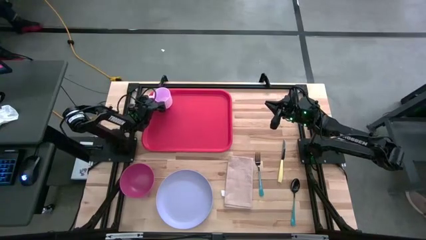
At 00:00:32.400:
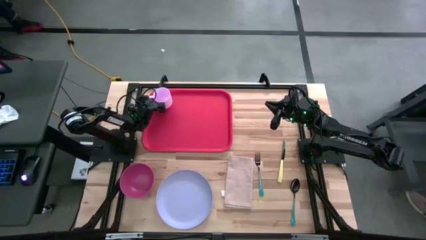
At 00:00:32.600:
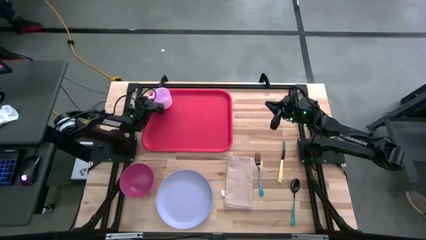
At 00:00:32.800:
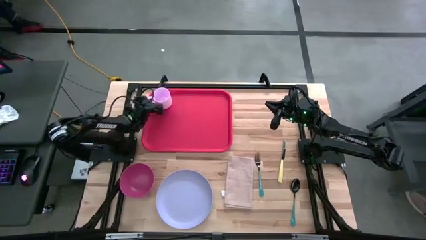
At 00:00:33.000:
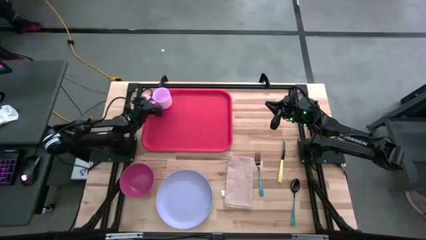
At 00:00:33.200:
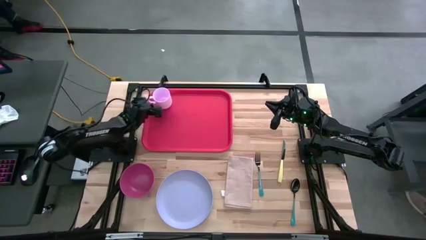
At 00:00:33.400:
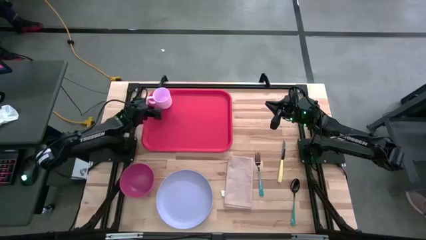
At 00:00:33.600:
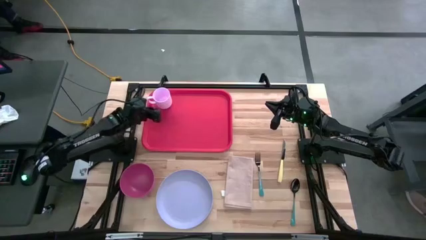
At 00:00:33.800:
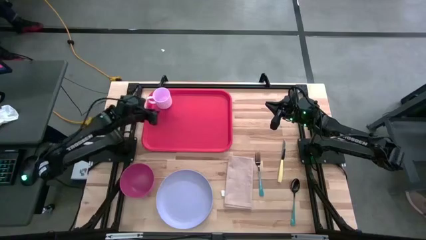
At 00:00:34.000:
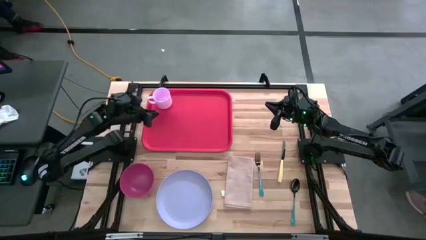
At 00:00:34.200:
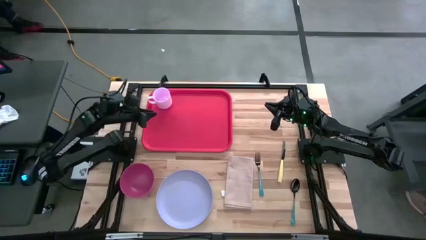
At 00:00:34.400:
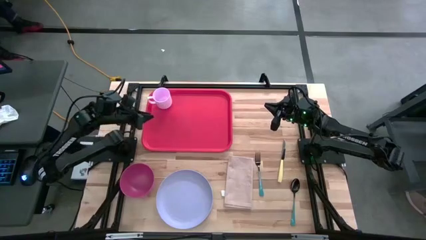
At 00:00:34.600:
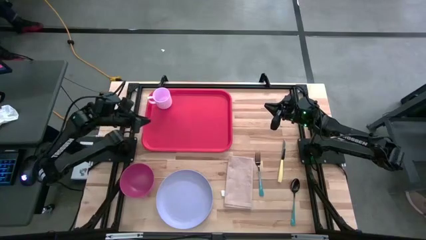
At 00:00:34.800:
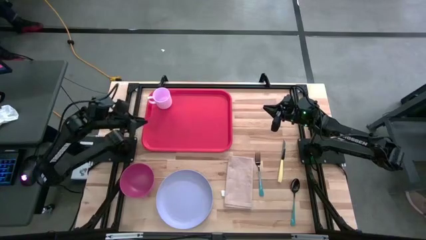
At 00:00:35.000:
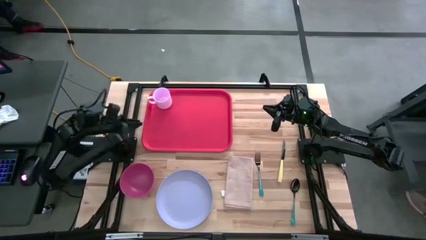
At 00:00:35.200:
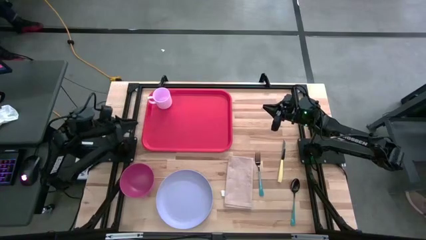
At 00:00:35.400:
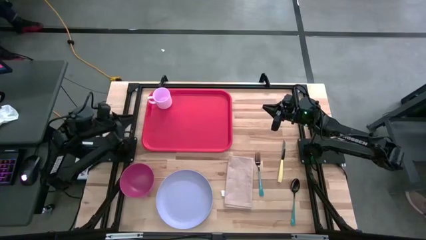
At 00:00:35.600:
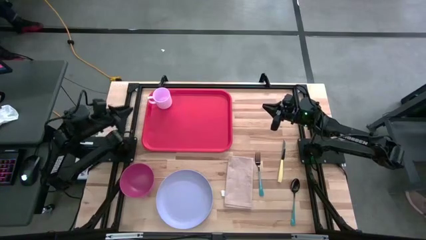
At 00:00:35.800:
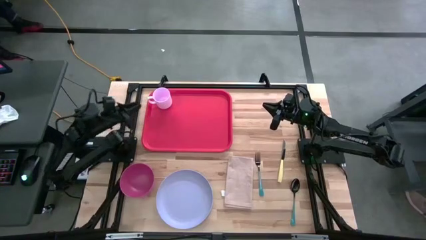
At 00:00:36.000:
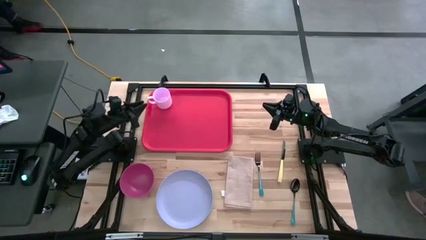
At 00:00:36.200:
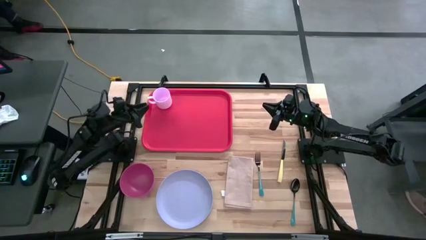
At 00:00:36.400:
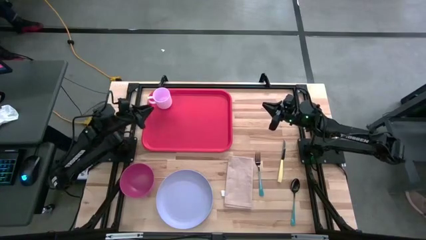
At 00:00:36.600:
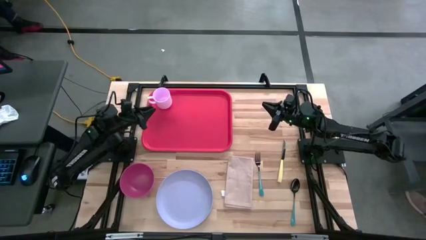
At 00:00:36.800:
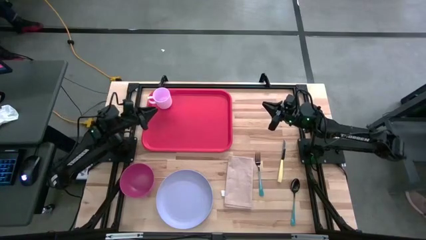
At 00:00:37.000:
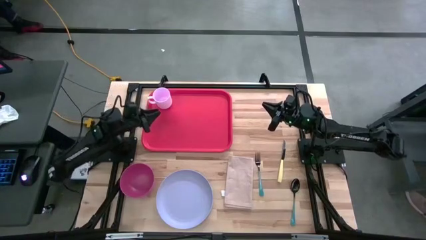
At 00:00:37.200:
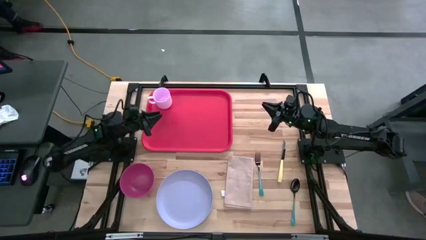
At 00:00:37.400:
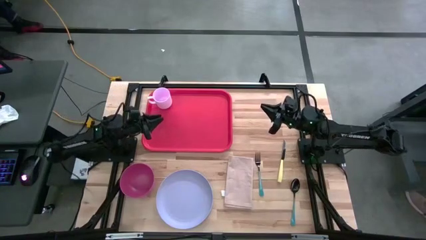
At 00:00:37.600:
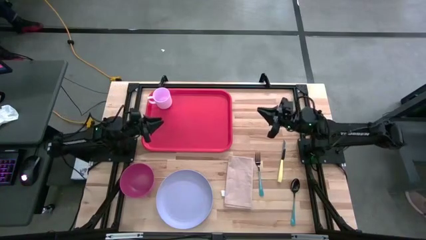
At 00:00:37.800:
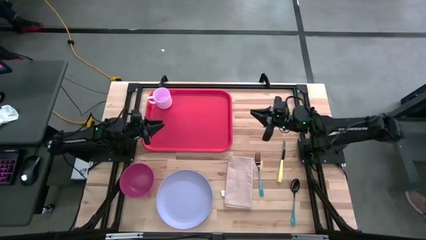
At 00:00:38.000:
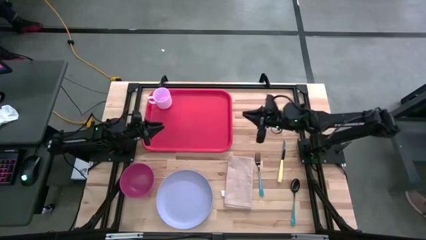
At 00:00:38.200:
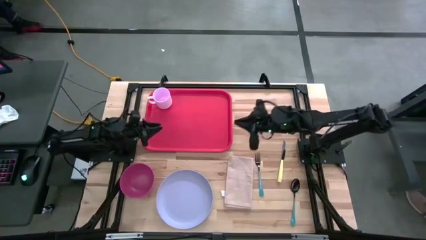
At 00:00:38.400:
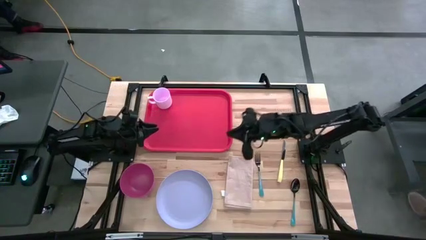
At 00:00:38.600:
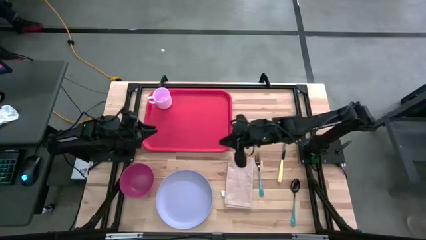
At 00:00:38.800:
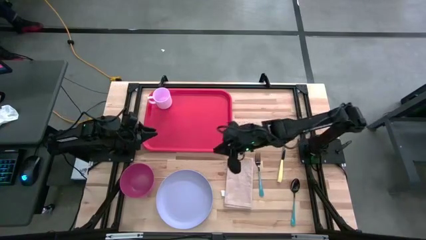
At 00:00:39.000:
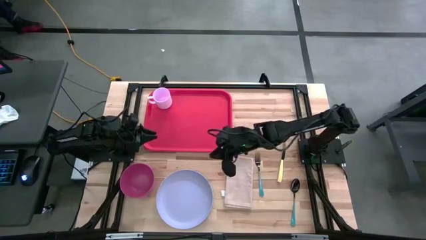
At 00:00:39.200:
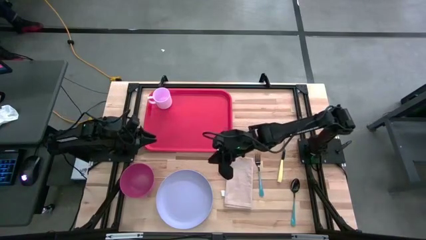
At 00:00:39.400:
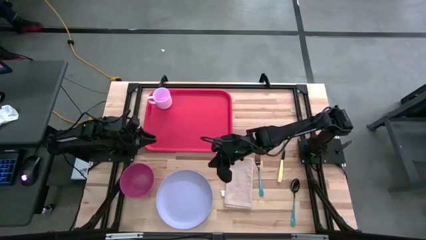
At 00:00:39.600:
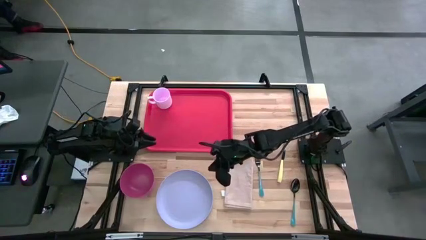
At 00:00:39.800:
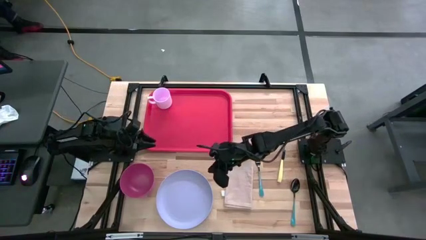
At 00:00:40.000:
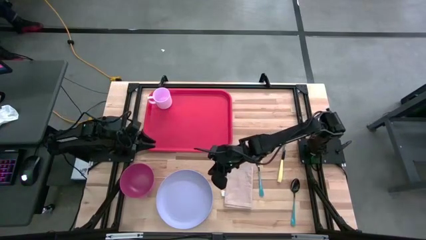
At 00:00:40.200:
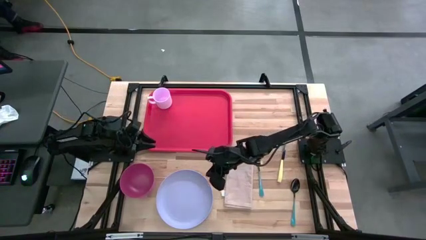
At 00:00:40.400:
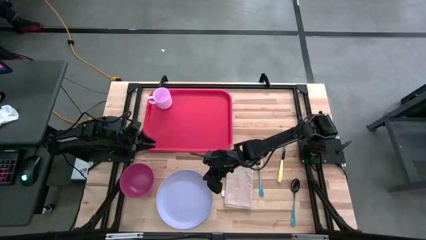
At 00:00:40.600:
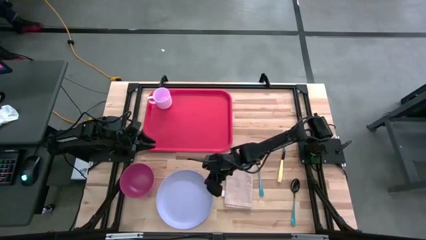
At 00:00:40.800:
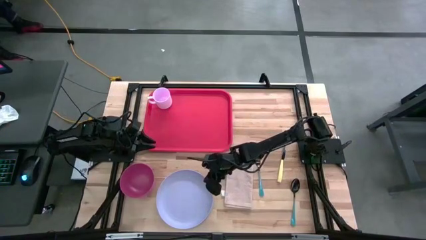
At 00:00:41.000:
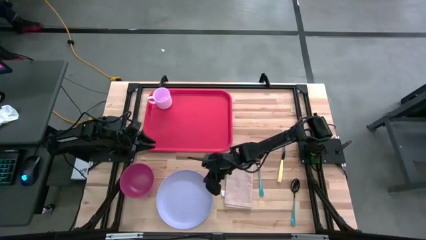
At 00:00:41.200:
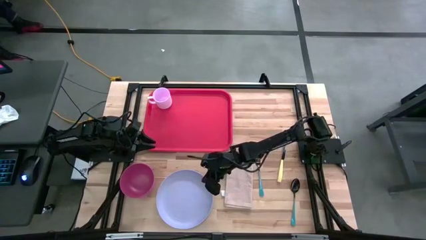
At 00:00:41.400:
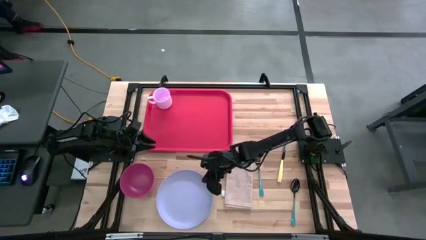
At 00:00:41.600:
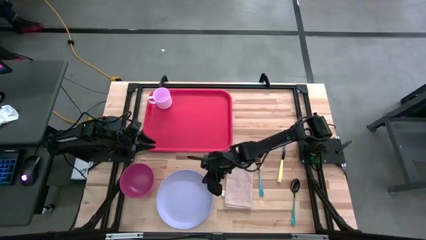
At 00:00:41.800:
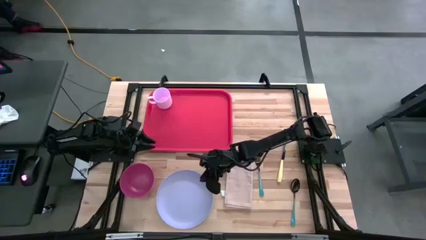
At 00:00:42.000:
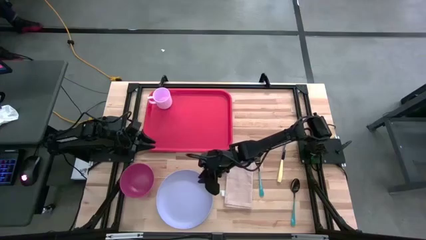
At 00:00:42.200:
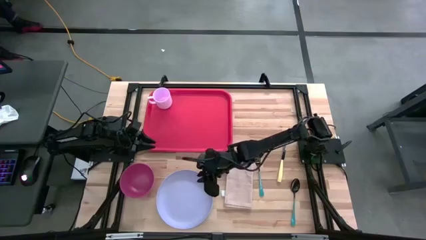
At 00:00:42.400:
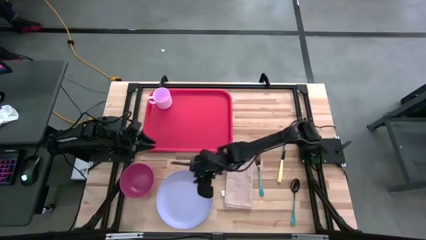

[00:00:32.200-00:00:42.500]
Task: Set up tray
Put the blue plate to the bottom right of the pink mug on the red tray

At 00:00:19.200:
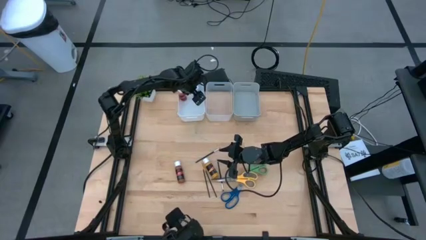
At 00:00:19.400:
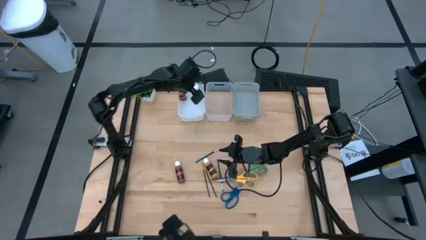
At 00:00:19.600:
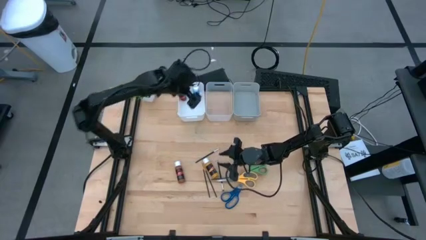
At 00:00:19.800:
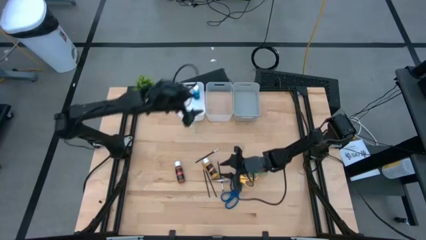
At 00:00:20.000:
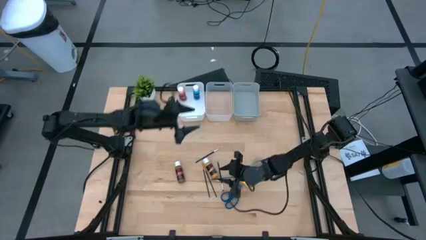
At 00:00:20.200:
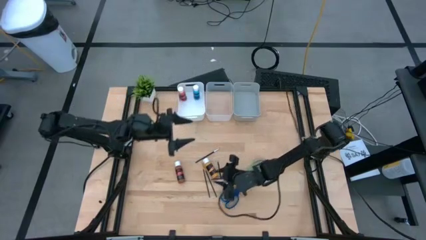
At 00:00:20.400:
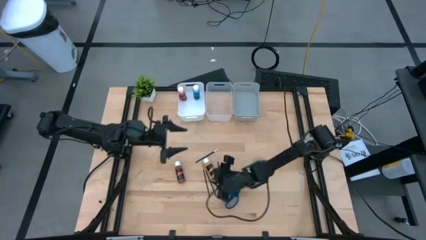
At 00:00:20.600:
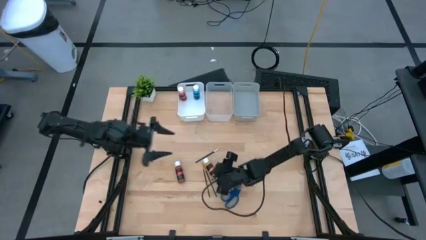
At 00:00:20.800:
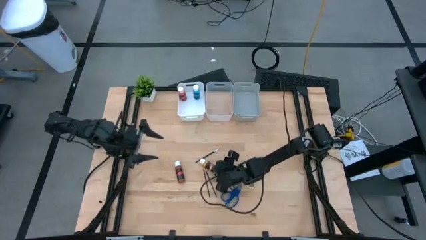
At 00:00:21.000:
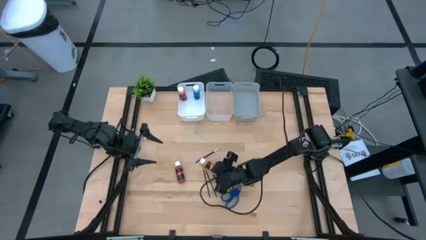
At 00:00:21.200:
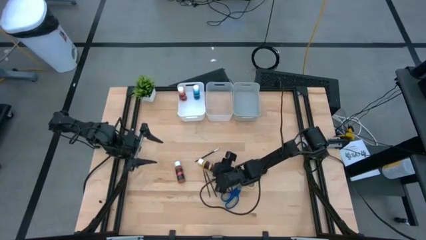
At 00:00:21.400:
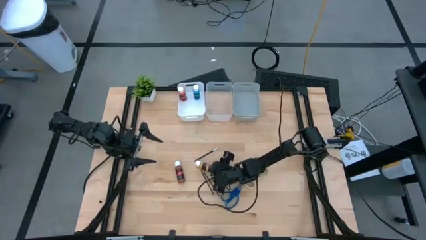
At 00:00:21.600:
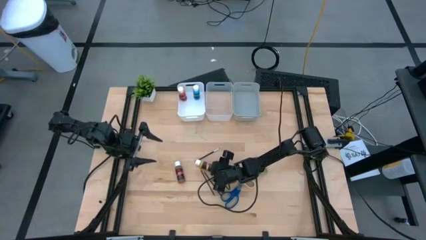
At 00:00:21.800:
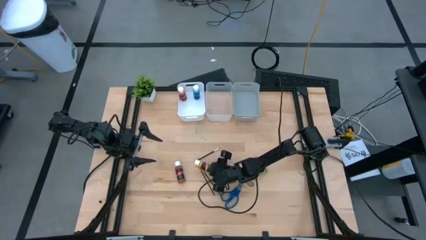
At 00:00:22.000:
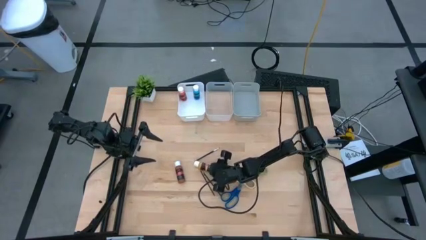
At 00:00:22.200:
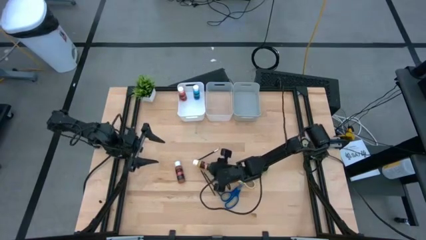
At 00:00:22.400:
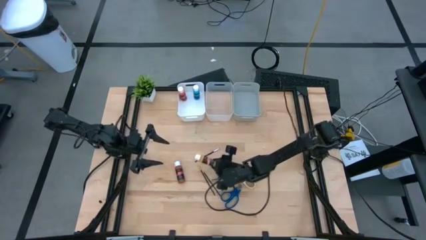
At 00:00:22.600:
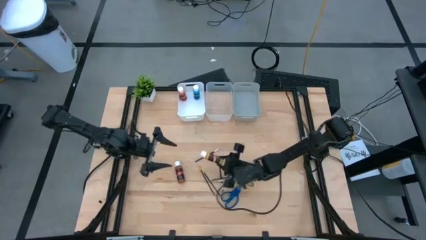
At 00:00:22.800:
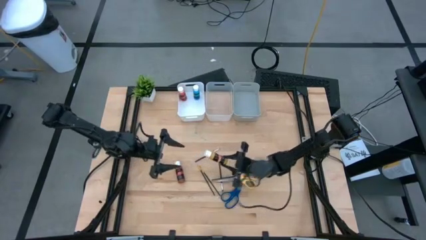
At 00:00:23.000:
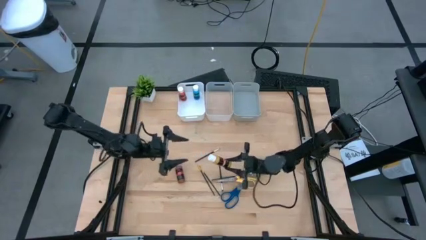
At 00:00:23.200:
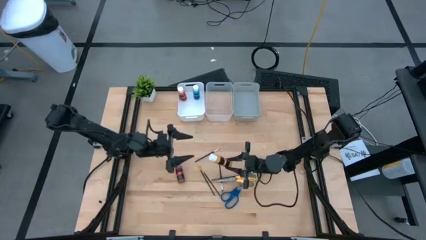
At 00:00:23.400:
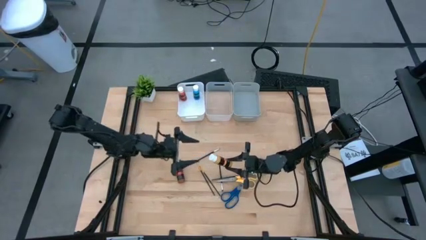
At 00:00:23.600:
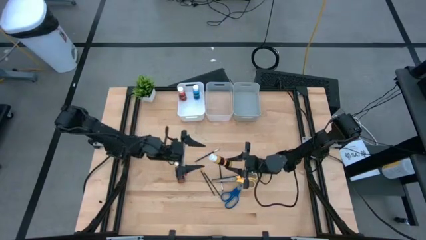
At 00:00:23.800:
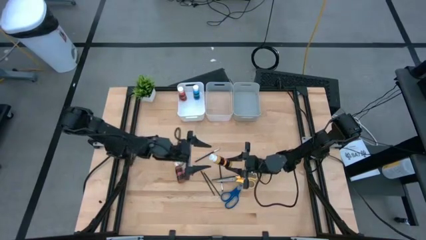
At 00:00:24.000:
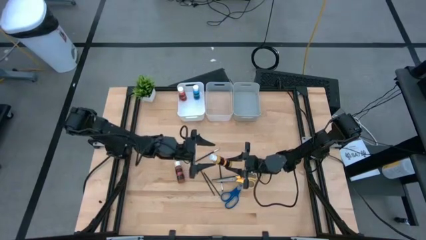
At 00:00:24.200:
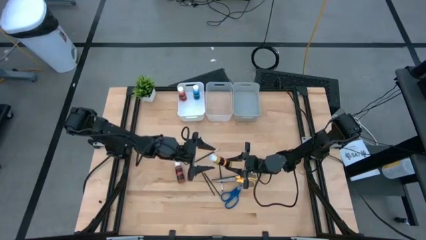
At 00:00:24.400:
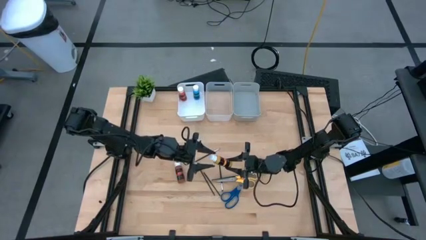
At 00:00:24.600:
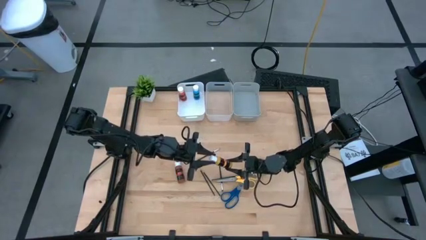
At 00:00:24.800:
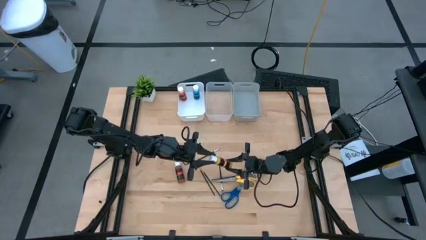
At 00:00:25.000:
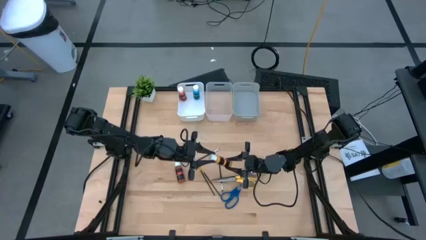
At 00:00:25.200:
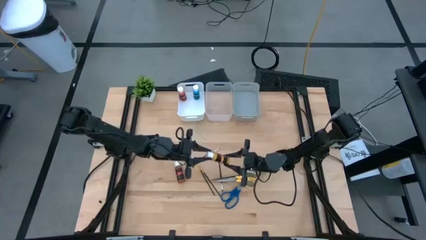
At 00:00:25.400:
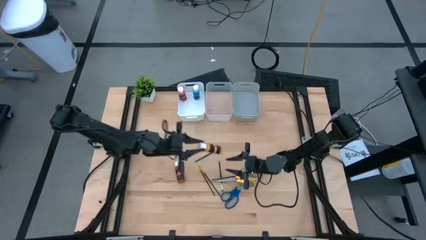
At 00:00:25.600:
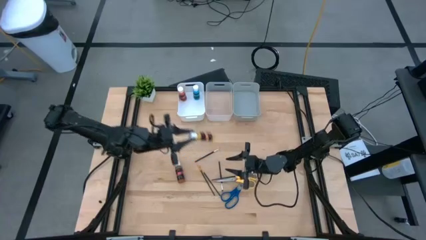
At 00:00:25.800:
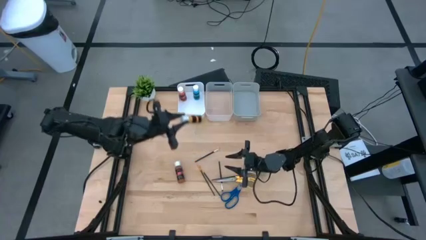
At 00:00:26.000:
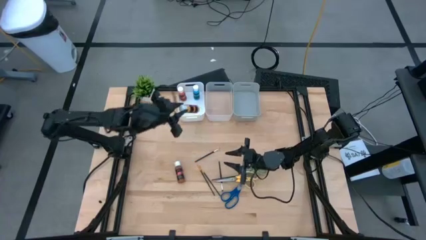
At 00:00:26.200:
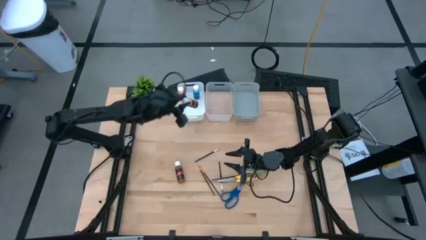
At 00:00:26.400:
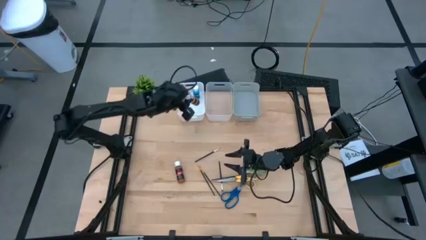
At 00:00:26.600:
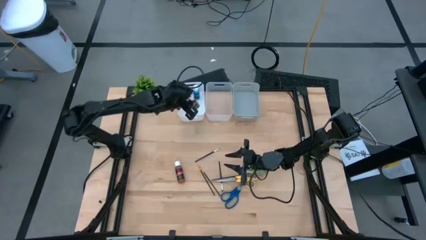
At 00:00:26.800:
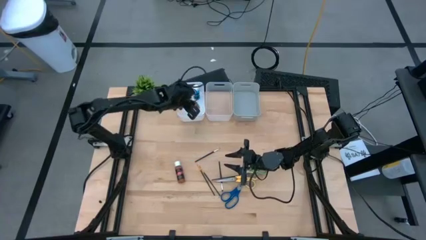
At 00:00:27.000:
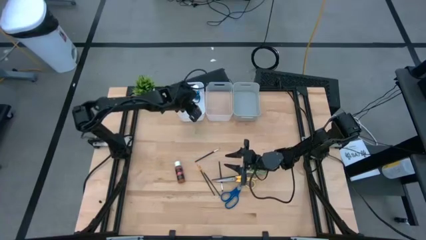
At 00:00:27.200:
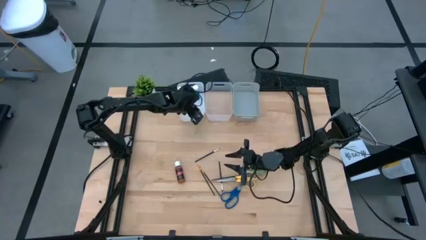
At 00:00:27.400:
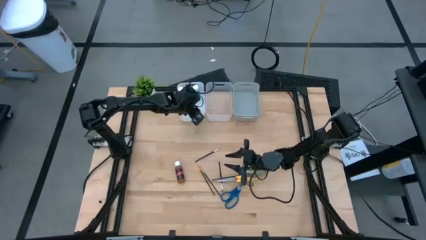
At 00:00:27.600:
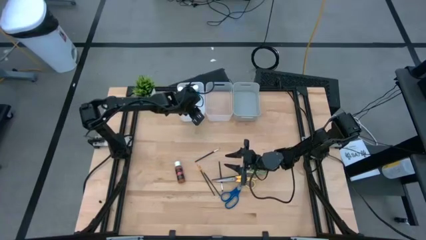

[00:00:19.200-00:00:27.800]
Task: Pick & Place Paint Supplies
Put the yellow paint bottle into the white bin
